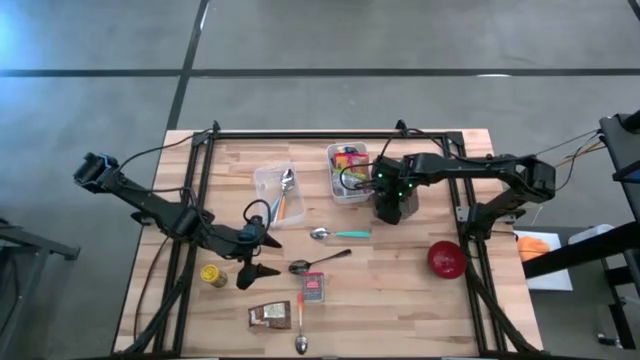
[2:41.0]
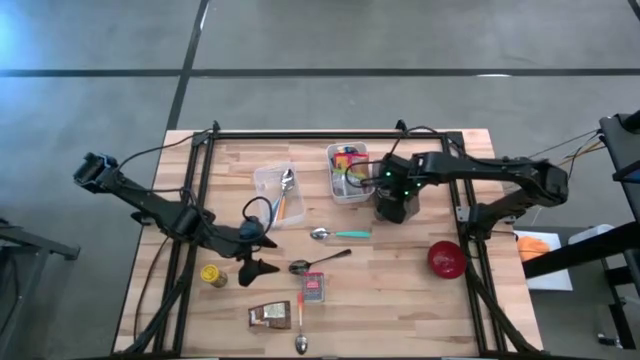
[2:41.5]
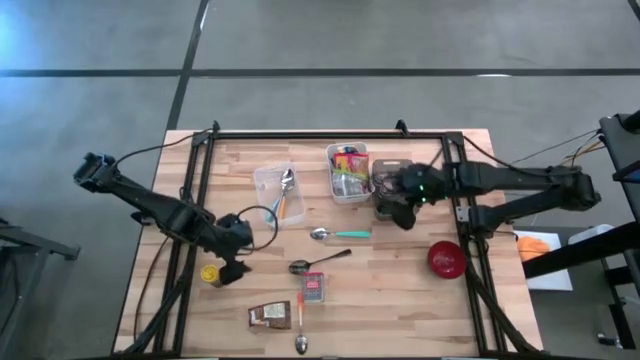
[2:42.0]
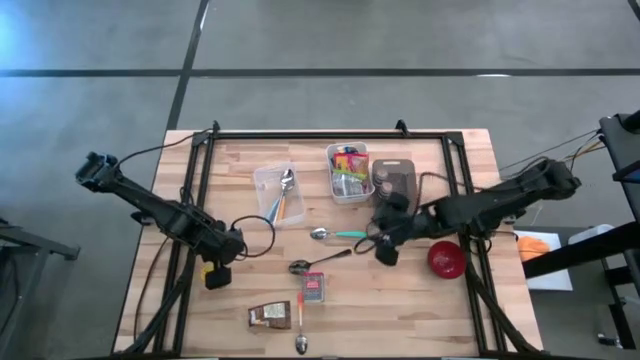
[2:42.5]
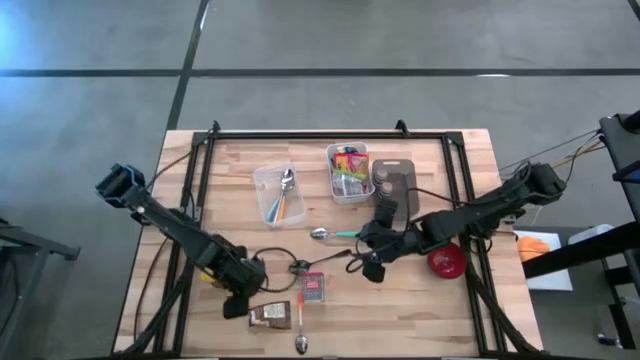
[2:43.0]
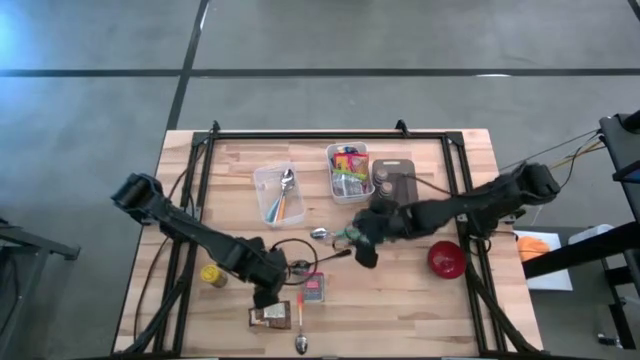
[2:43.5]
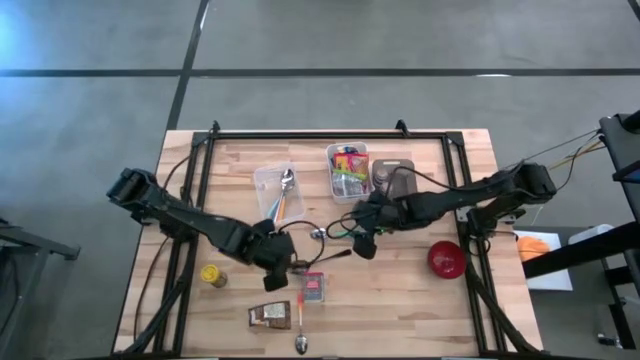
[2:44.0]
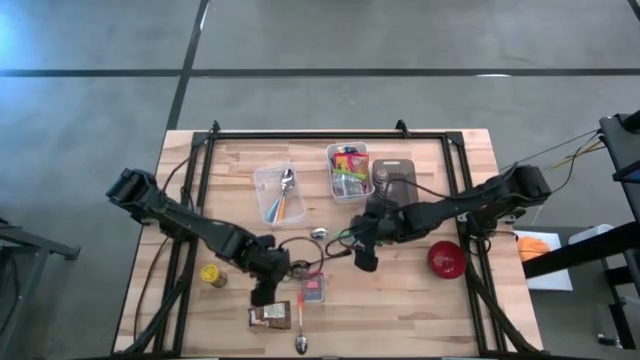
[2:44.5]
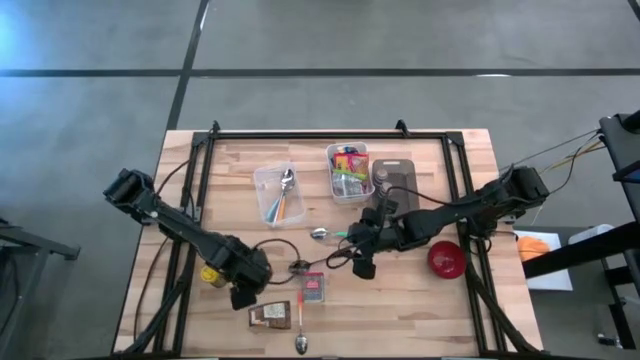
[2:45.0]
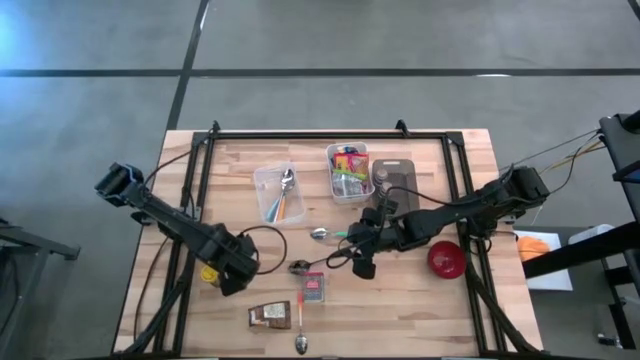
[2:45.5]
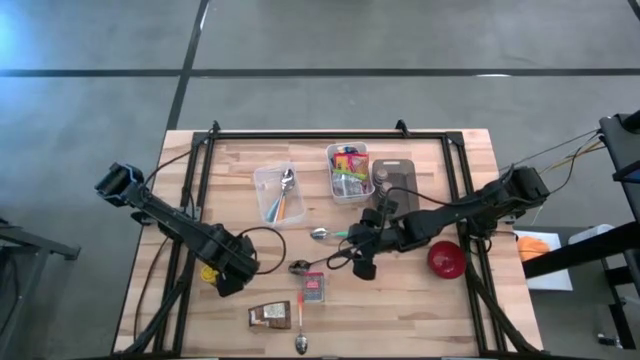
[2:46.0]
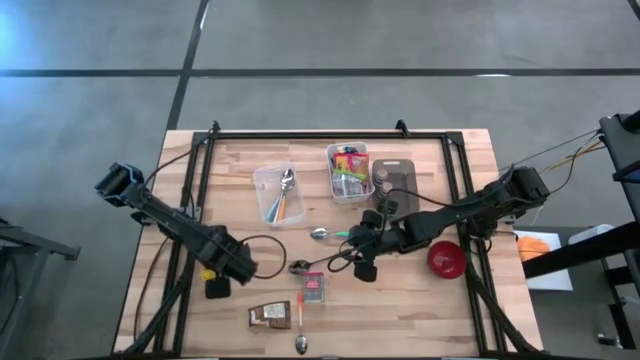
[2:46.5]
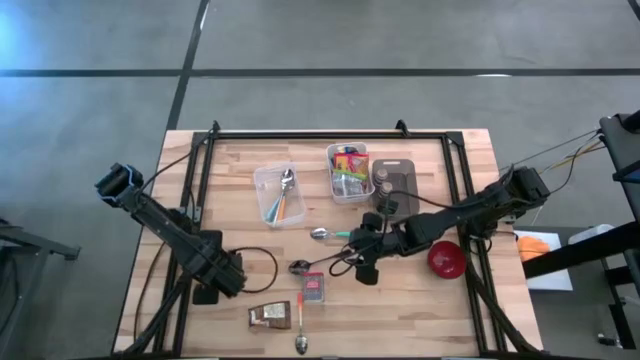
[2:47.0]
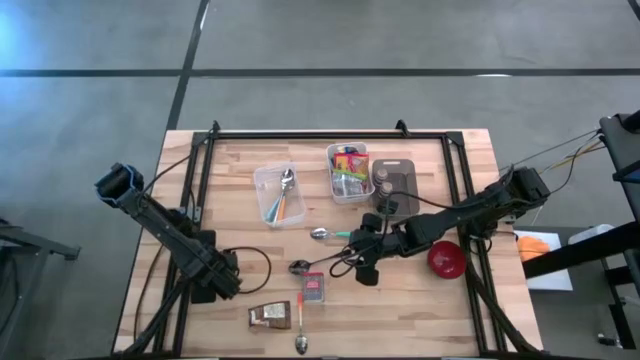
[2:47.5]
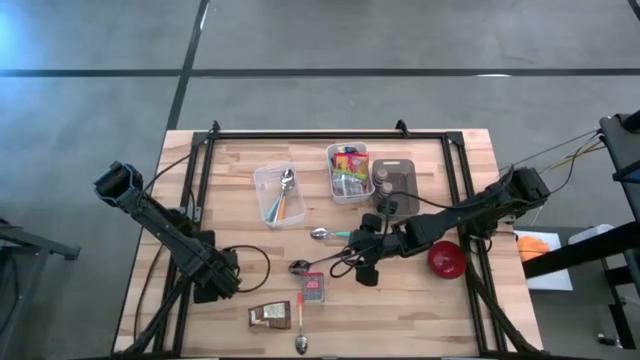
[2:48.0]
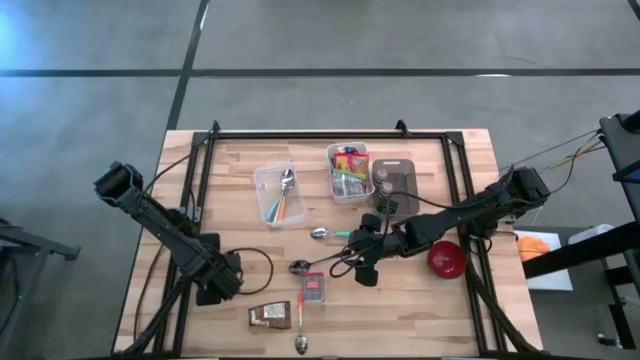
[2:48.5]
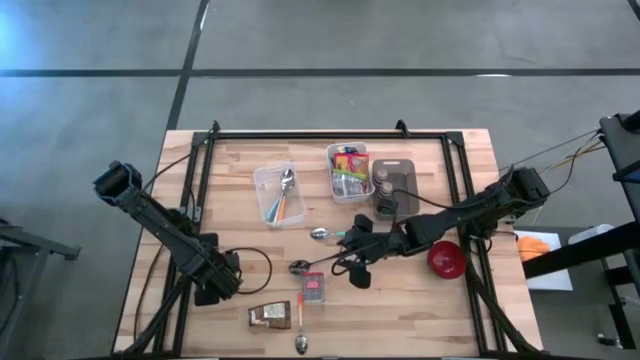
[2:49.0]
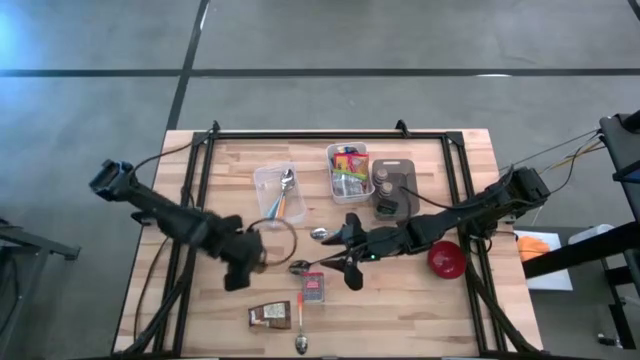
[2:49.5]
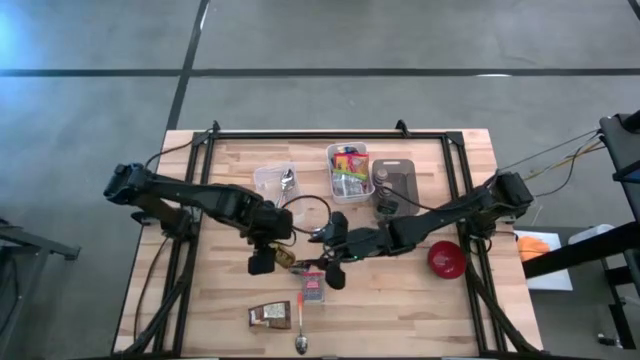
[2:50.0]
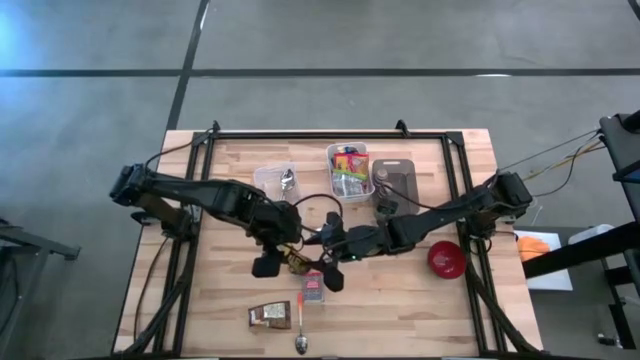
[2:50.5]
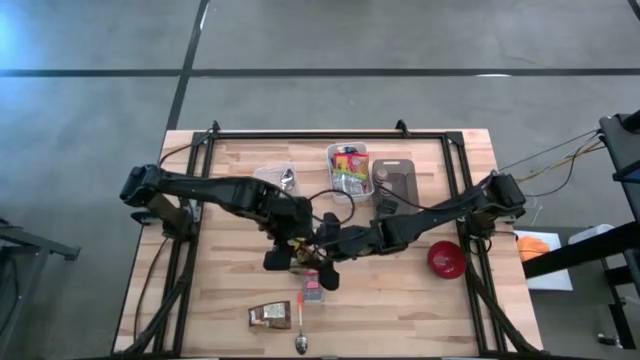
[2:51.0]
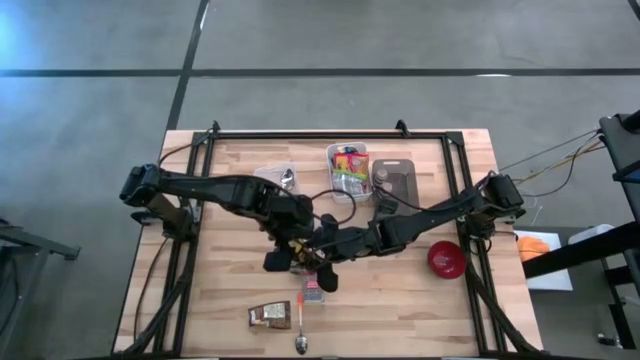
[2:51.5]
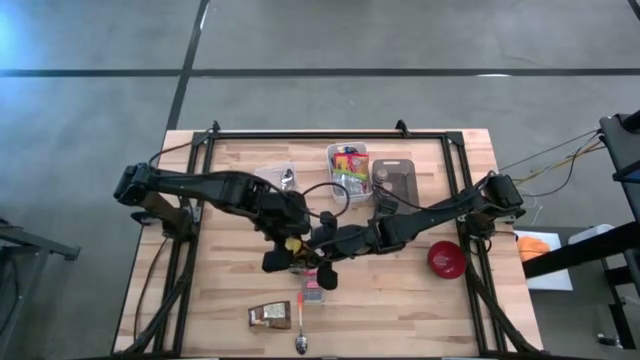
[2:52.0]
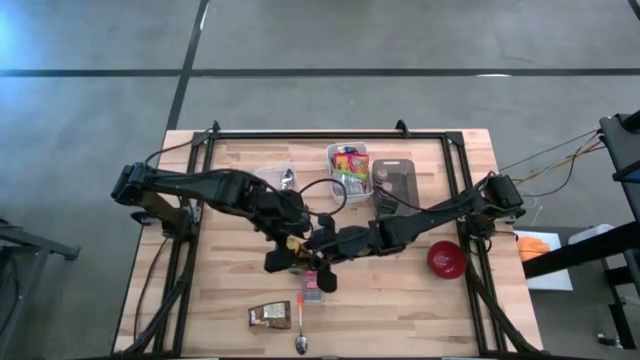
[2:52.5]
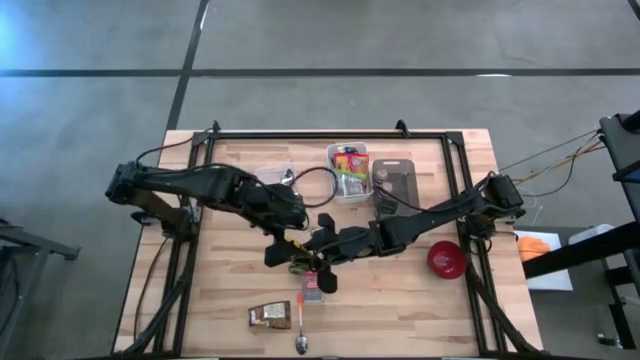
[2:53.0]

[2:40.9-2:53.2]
Put the yellow seasoning can into the black bin

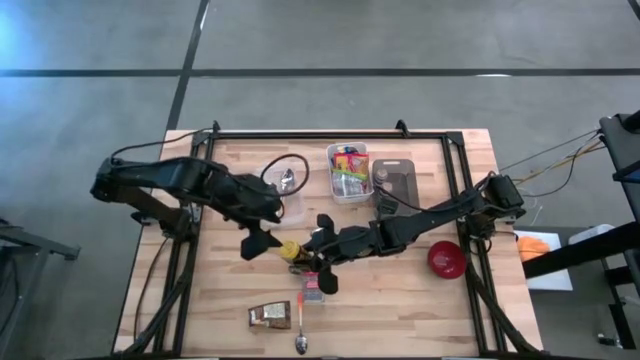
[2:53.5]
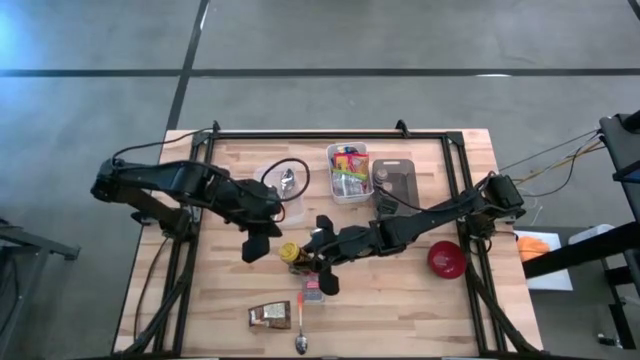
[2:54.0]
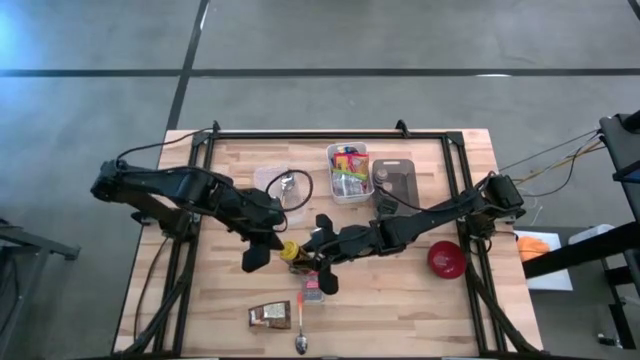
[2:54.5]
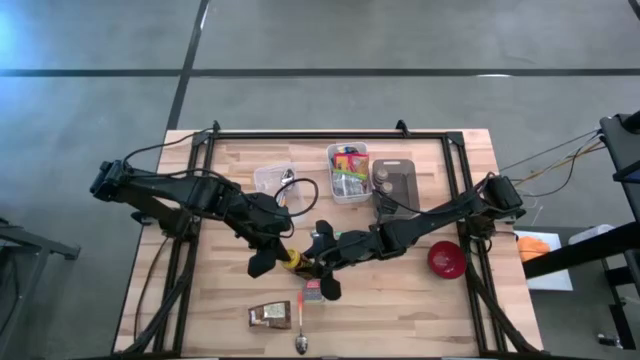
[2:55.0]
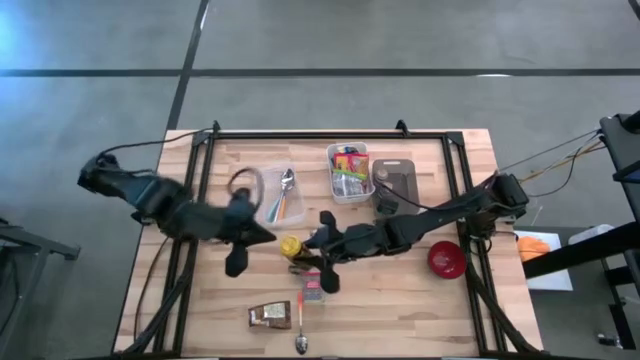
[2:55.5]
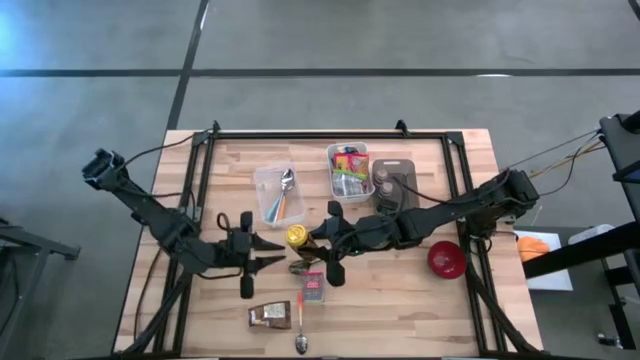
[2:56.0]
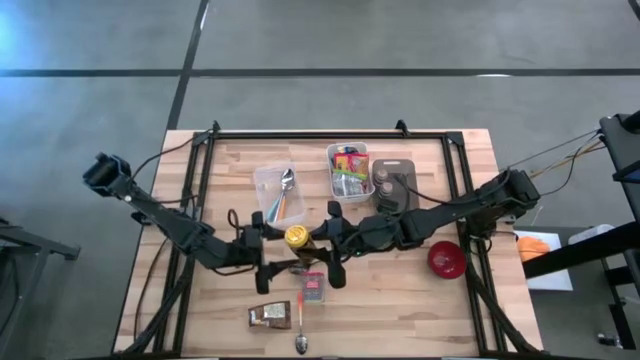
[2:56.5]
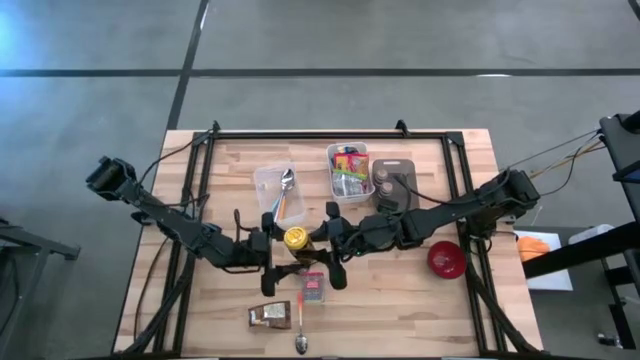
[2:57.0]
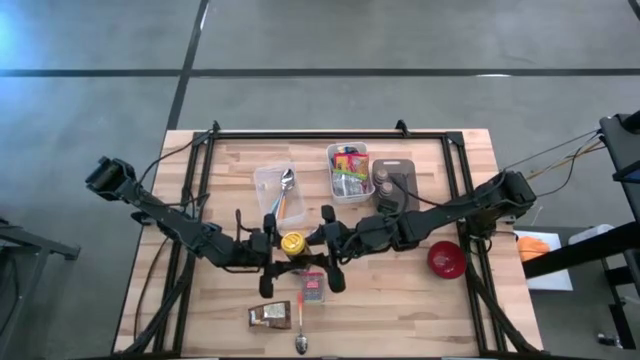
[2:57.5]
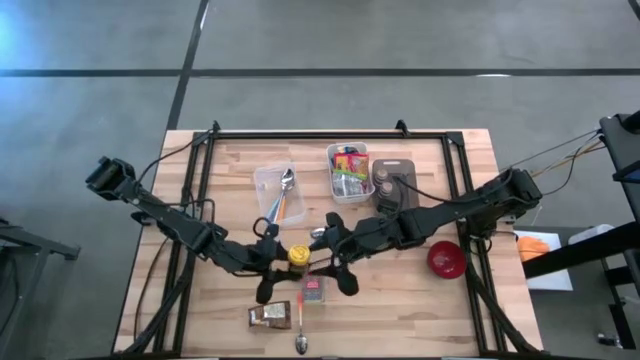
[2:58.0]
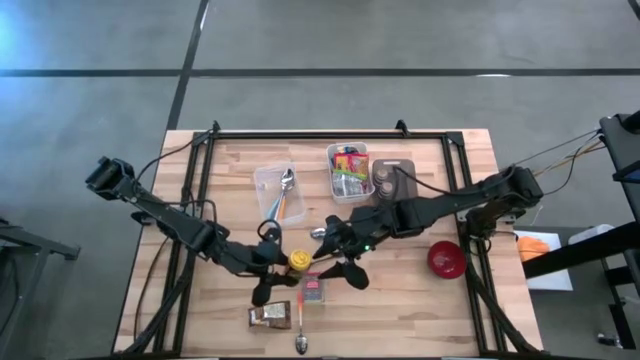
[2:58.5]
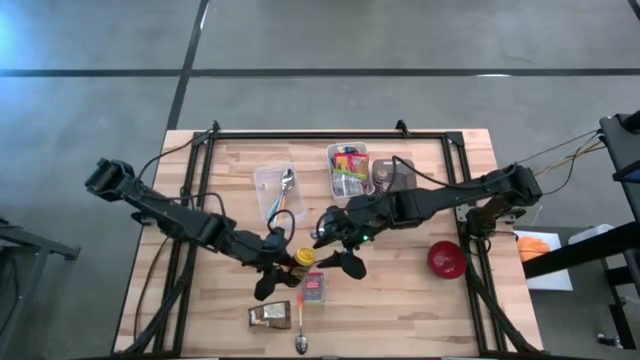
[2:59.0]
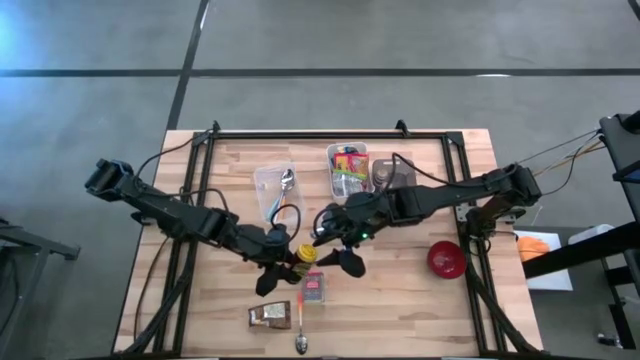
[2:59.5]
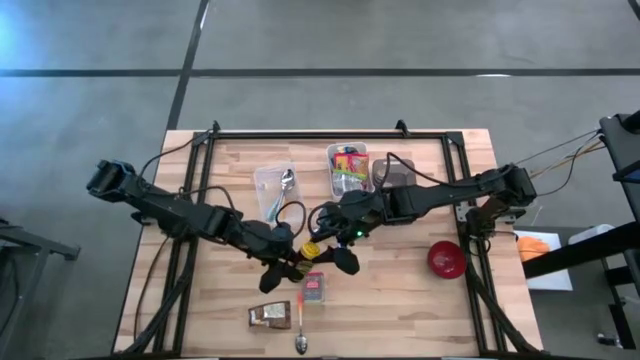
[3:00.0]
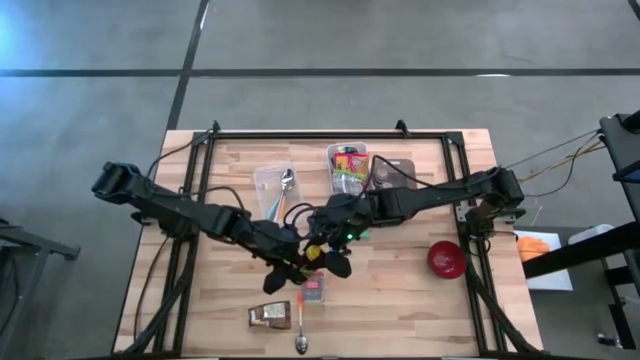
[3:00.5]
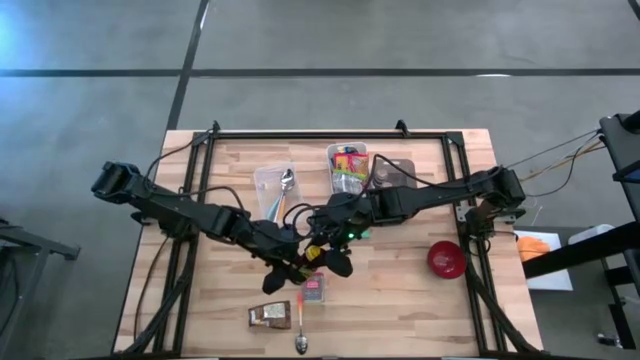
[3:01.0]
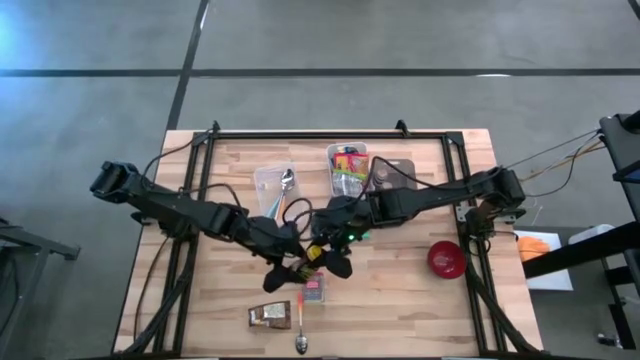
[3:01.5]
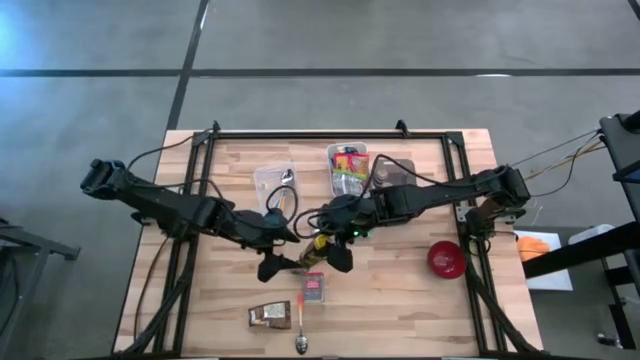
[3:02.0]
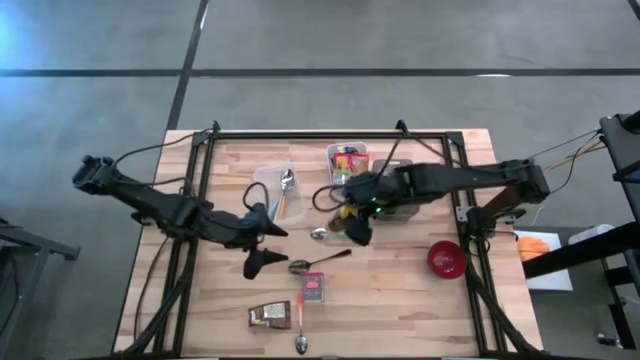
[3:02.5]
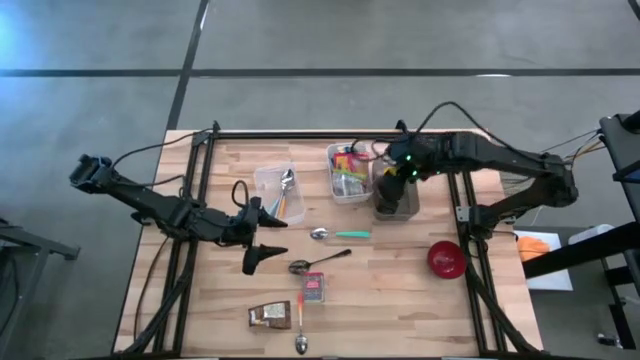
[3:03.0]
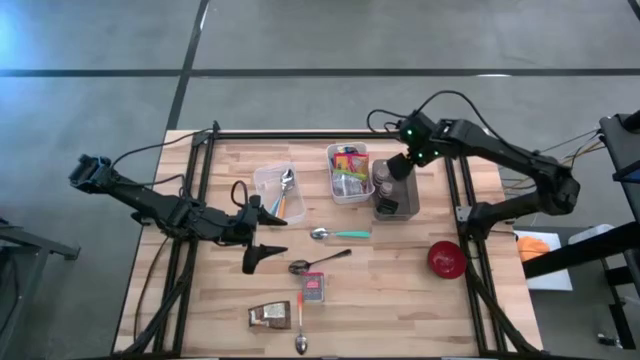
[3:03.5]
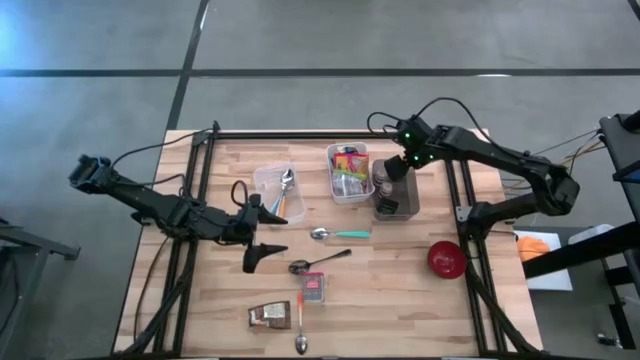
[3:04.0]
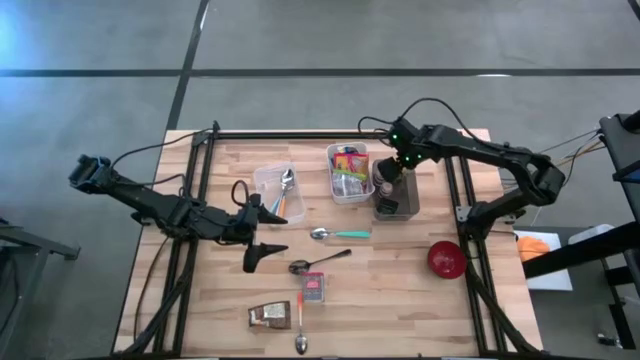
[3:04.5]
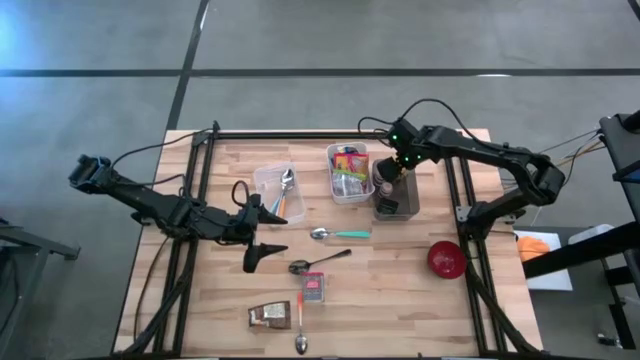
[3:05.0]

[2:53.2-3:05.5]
Put the yellow seasoning can into the black bin
